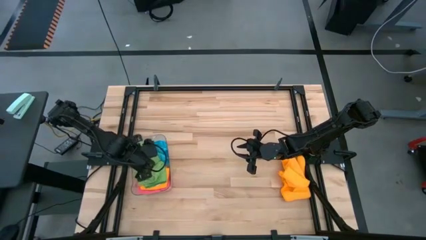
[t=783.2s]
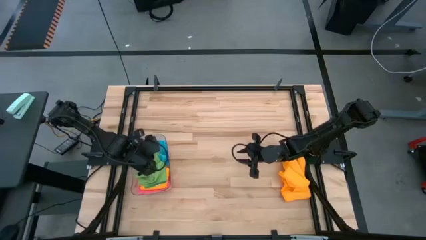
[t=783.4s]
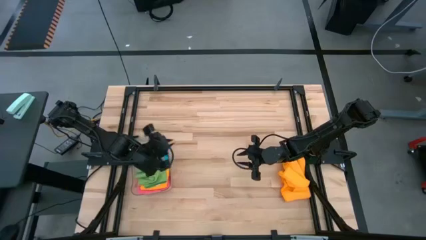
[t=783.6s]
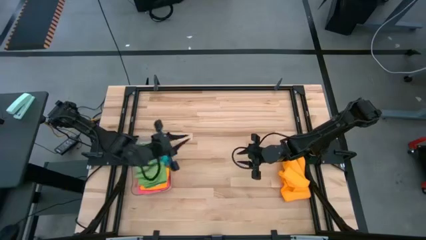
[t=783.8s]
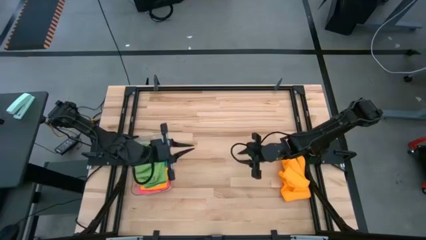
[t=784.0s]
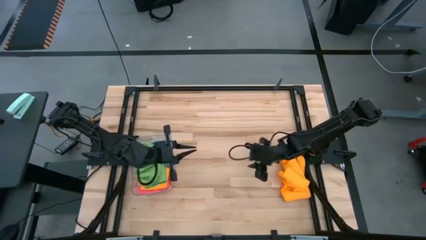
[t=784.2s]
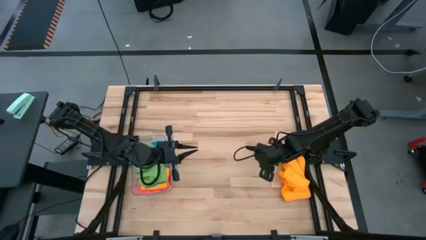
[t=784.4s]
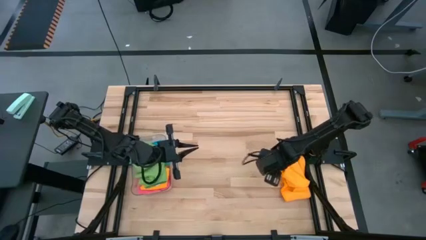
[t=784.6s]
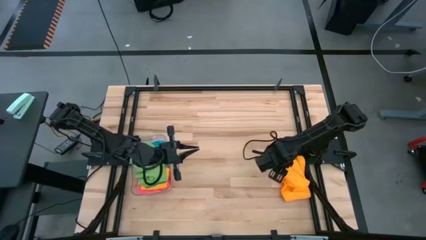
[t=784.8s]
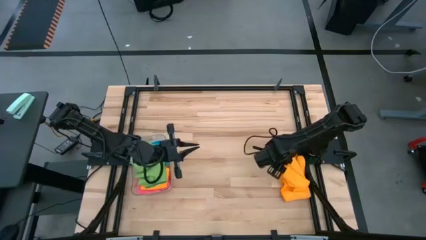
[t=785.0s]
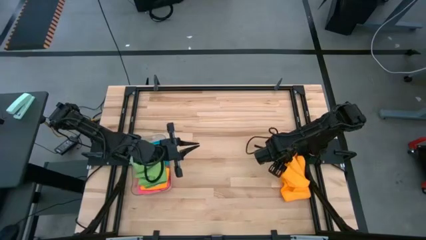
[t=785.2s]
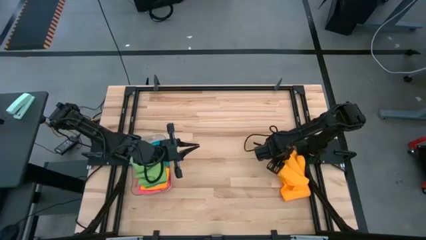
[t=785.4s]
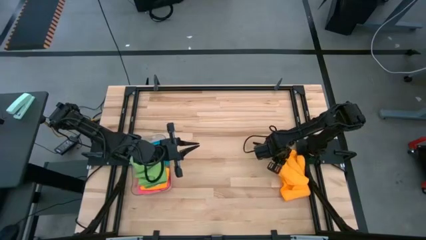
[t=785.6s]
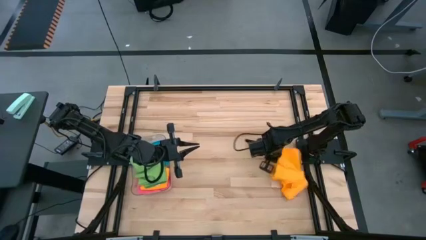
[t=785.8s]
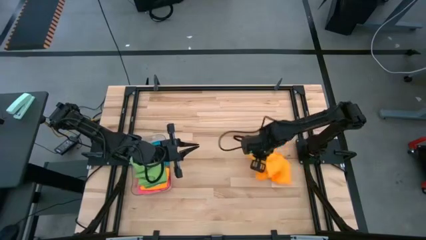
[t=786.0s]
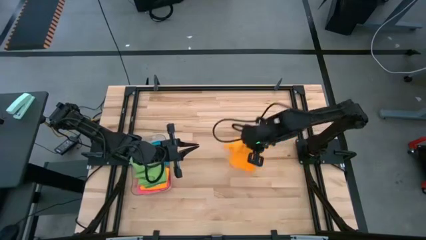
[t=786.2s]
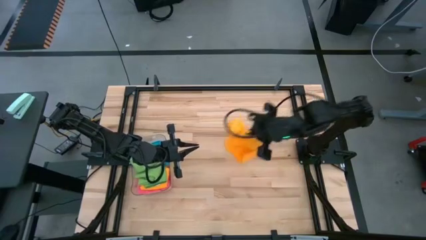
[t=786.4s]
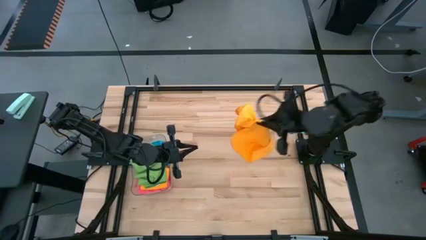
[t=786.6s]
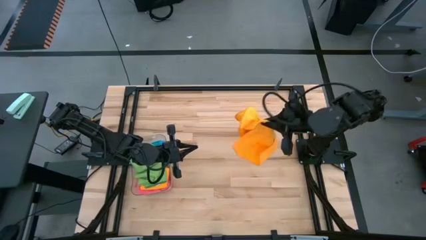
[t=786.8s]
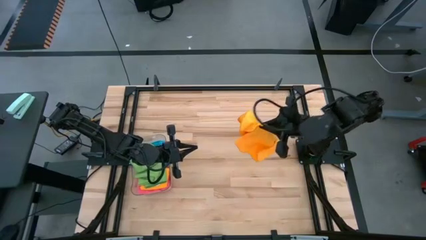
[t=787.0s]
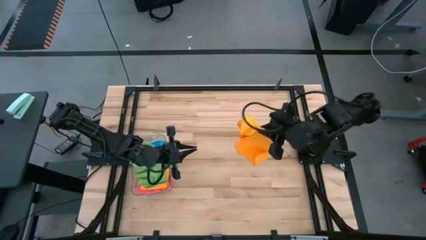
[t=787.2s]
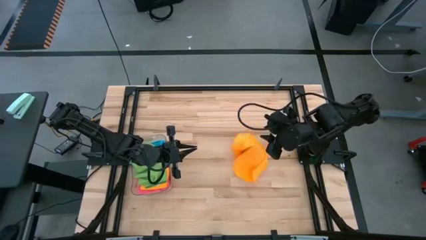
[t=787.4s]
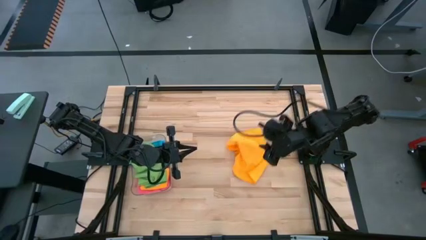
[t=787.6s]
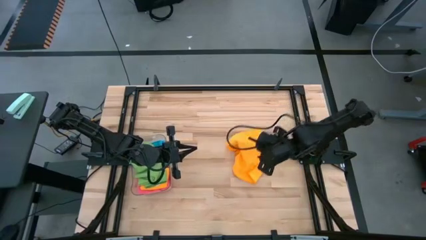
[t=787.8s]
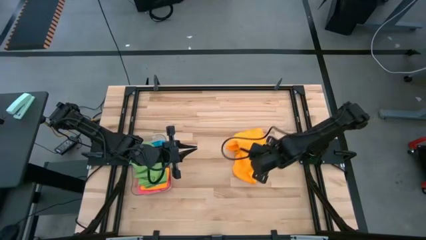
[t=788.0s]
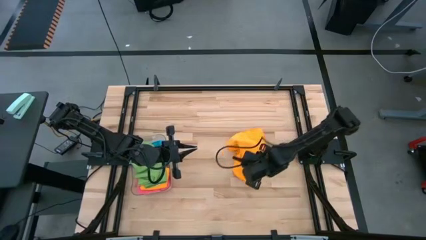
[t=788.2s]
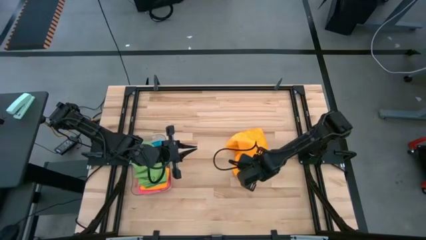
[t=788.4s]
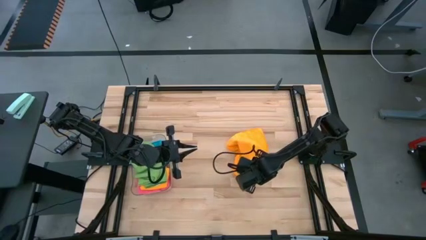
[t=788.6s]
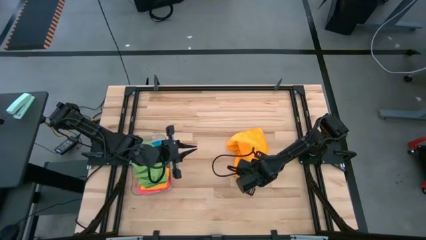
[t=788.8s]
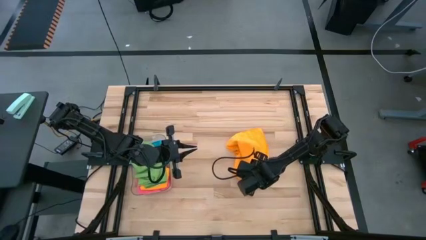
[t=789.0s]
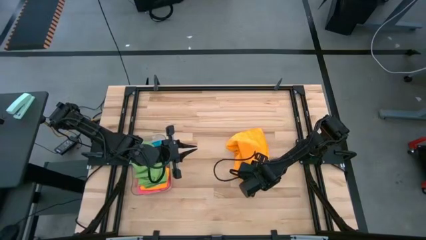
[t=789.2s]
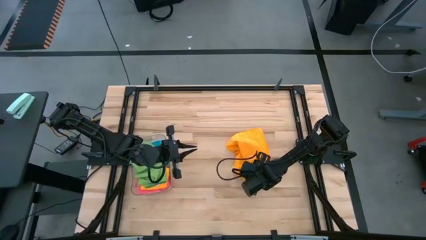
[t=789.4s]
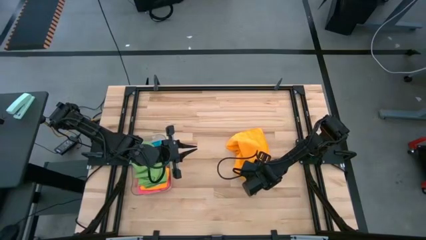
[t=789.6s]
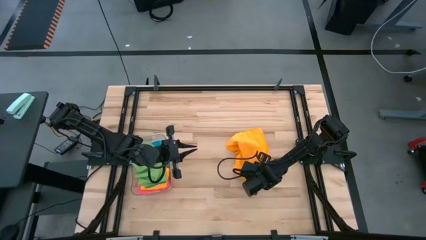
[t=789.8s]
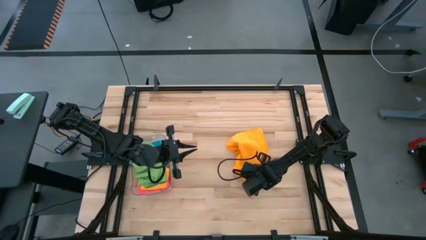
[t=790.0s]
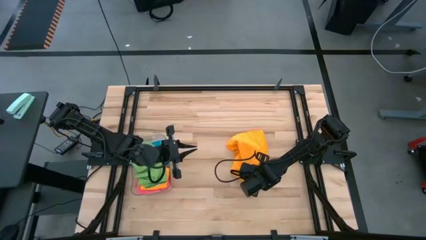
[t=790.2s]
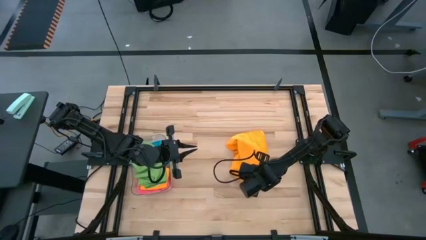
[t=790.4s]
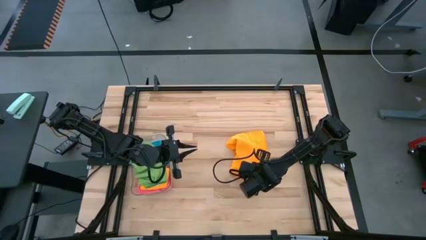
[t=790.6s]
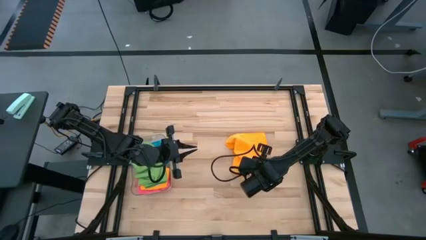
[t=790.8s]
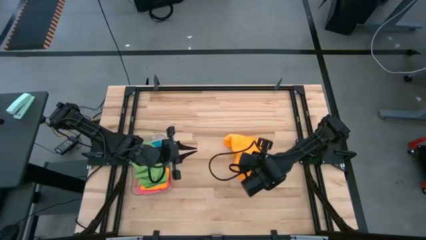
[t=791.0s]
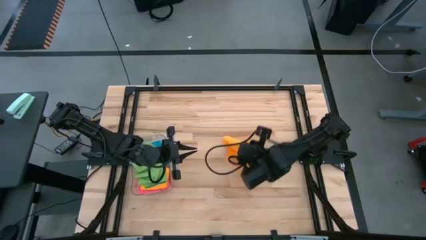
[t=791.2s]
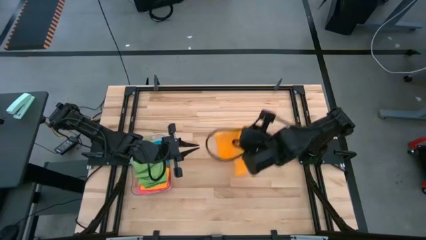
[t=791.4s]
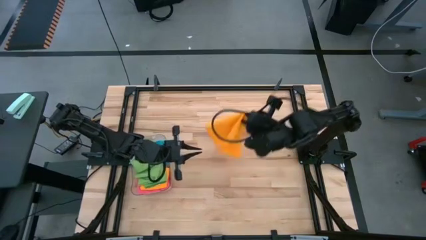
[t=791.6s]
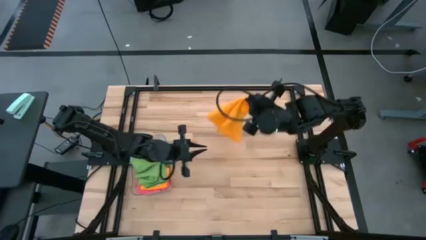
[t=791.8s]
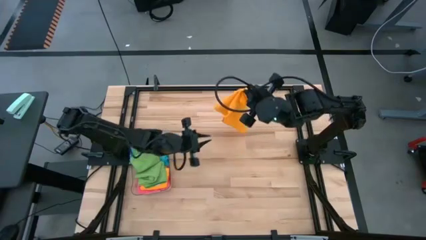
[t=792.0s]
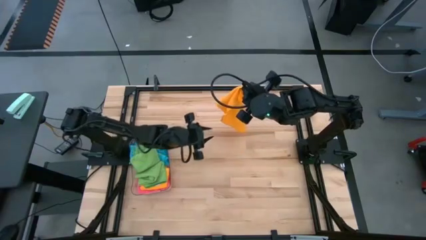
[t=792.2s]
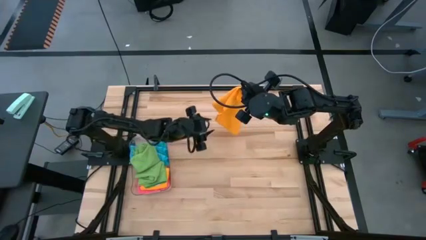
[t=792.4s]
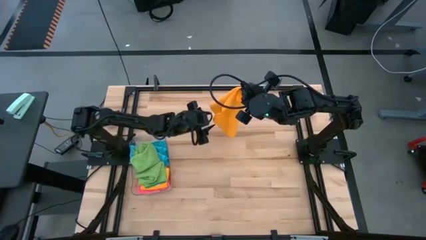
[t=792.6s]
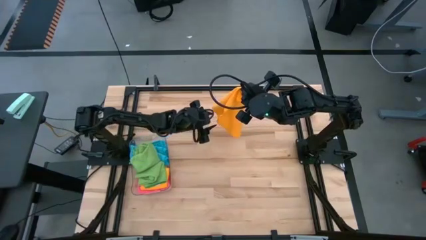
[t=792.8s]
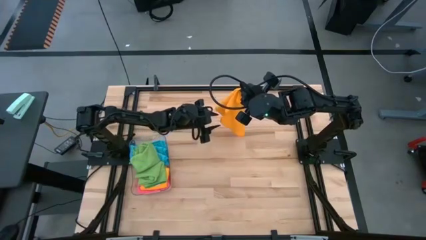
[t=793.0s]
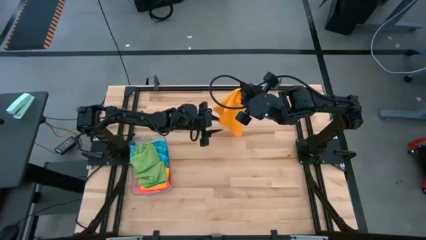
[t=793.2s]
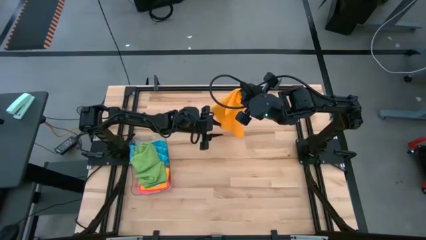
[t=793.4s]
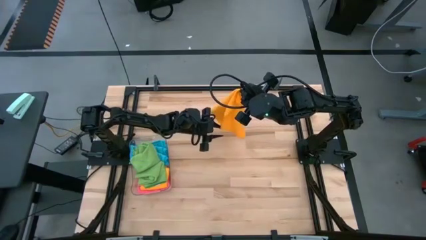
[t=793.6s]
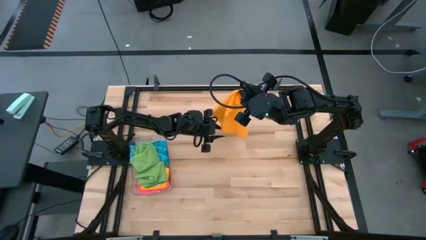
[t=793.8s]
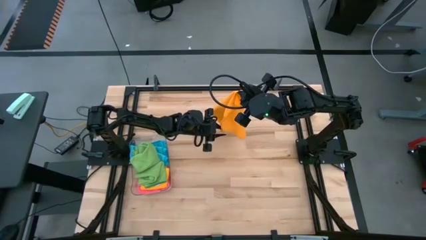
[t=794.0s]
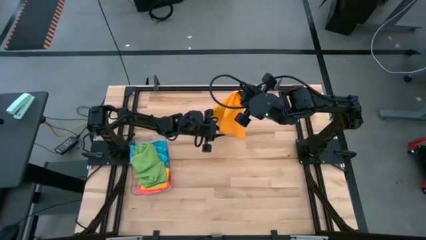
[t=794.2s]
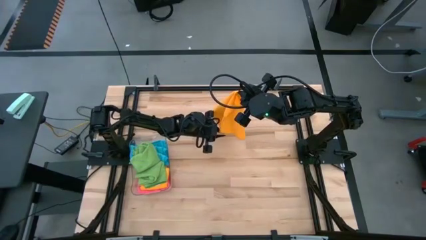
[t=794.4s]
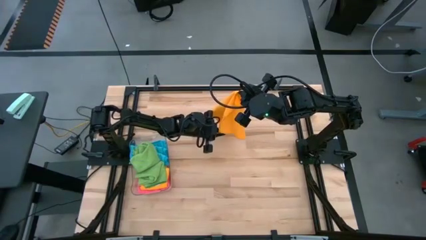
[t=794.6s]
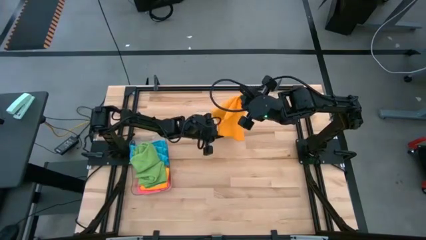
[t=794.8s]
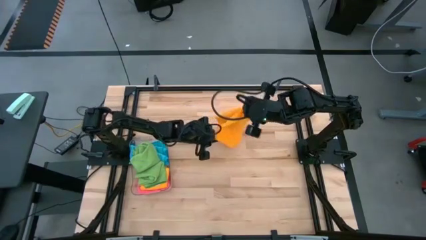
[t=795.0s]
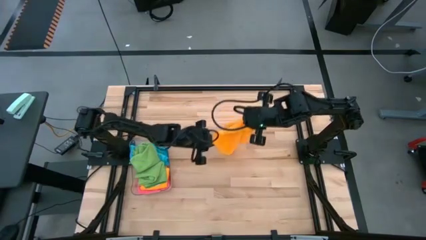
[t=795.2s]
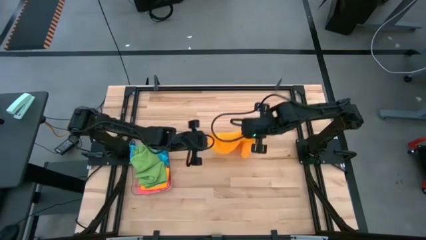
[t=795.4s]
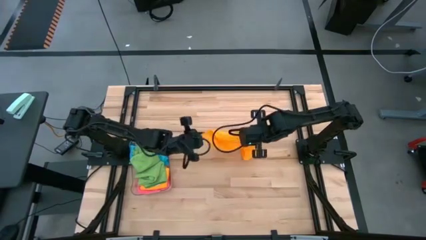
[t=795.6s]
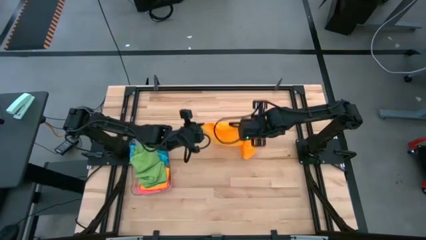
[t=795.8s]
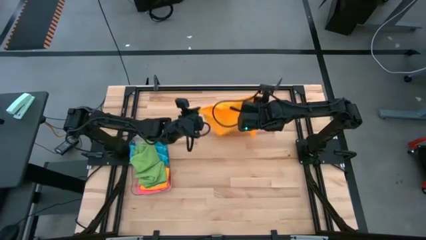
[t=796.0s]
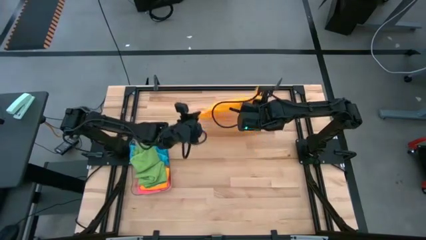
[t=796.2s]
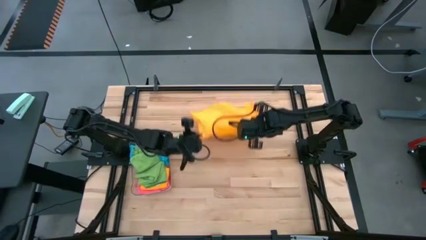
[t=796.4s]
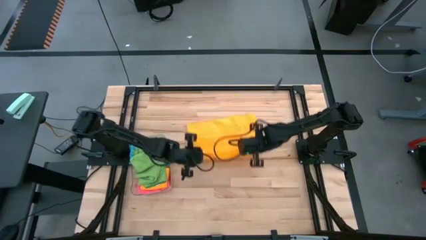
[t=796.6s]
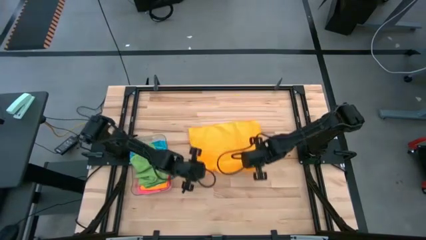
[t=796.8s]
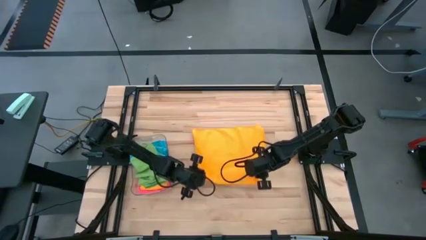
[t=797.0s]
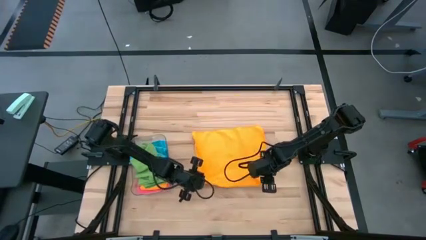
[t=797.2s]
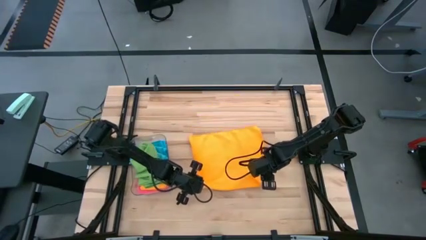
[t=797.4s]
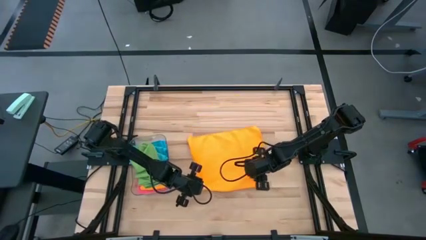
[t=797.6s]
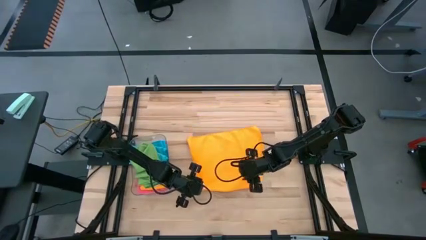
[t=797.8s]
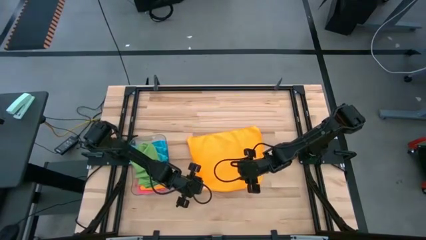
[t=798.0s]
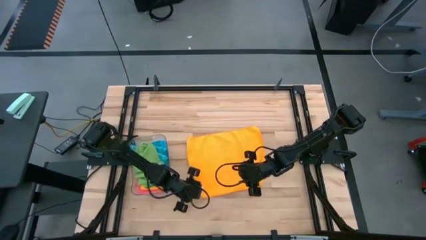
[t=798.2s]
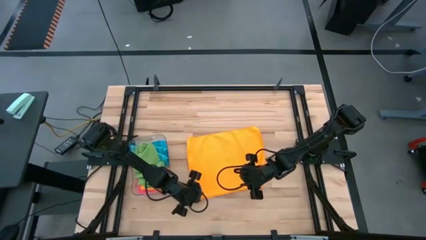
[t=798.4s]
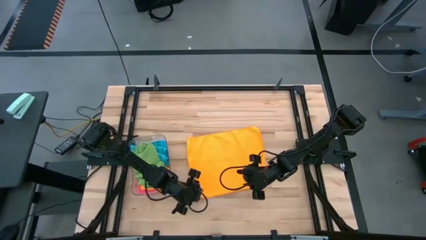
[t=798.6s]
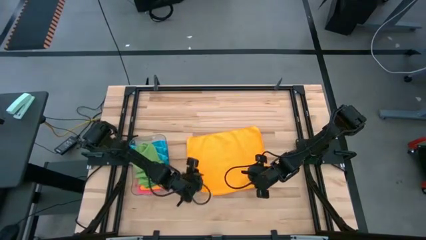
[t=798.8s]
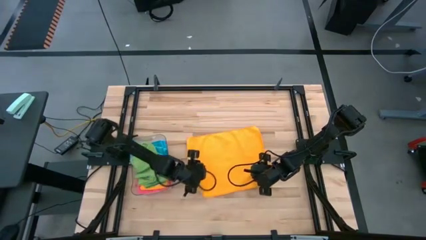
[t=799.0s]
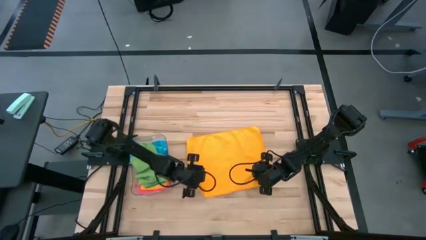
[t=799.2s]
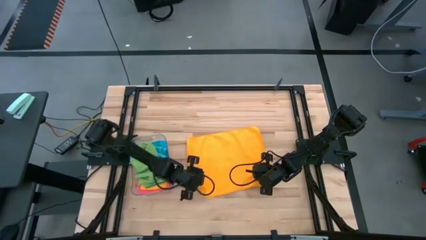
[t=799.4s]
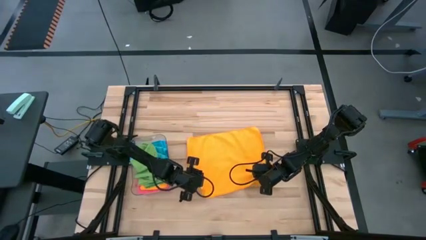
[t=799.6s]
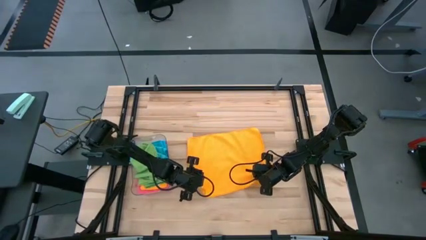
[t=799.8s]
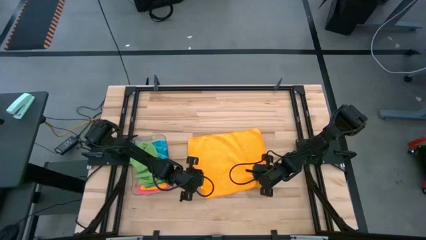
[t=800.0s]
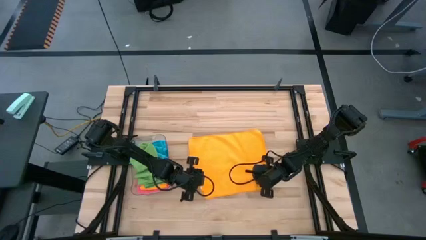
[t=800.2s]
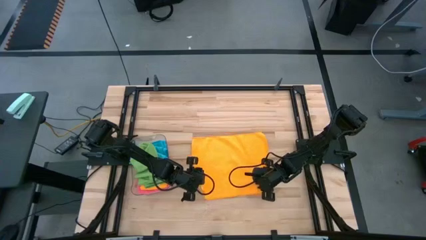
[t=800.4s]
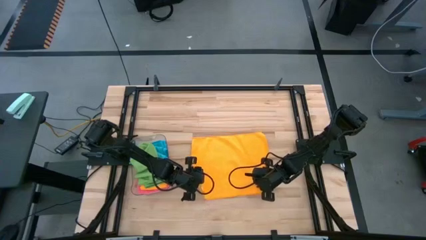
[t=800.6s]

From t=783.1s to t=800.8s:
Task: Fold microfiber towels
Fold the yellow microfiber cloth
